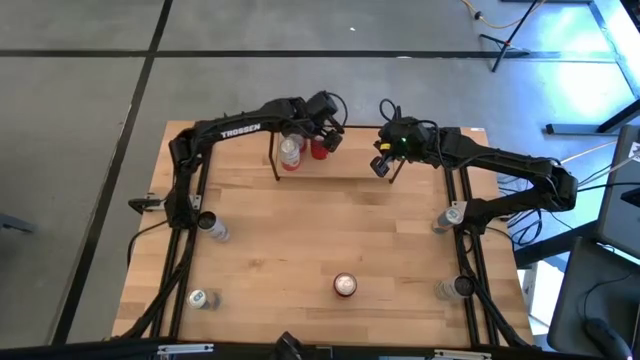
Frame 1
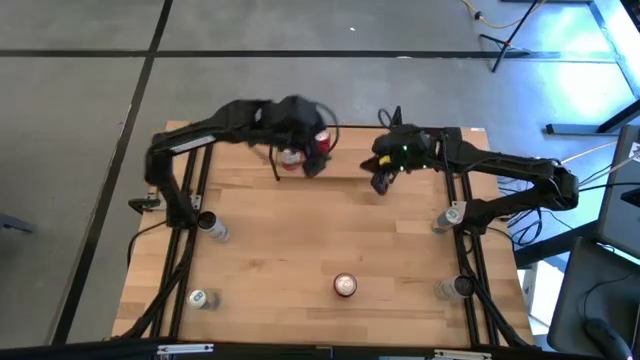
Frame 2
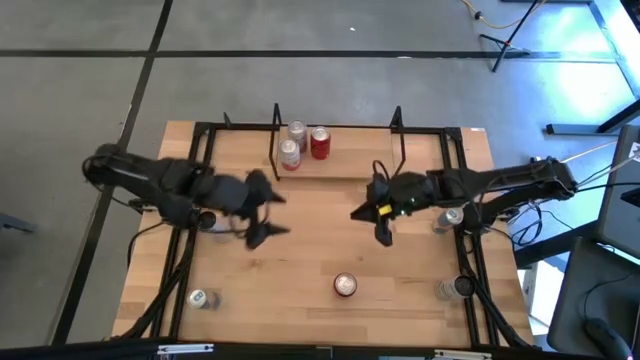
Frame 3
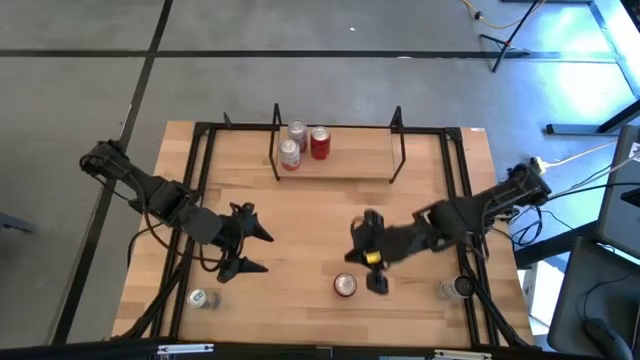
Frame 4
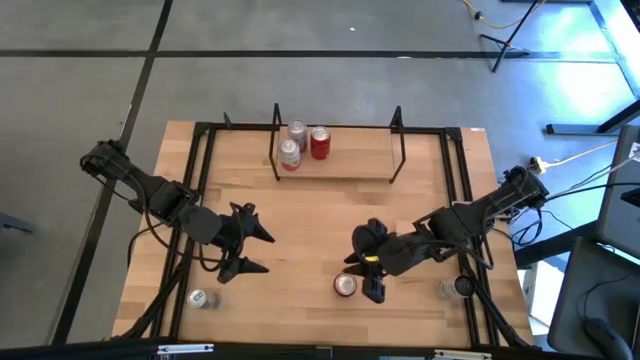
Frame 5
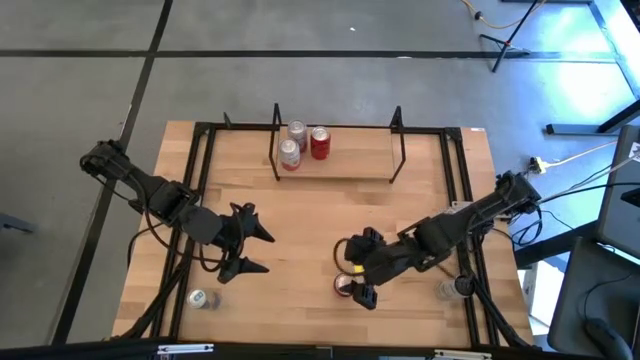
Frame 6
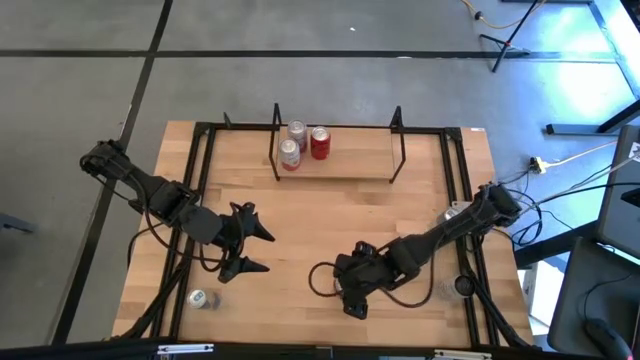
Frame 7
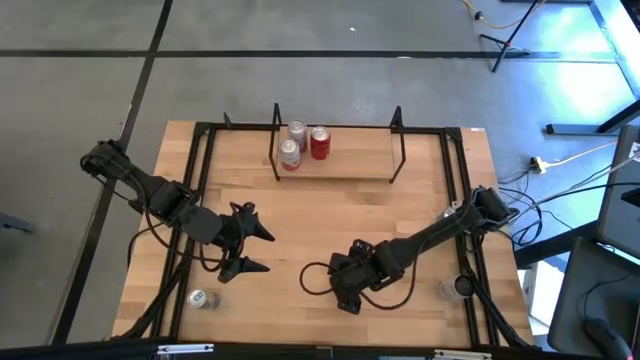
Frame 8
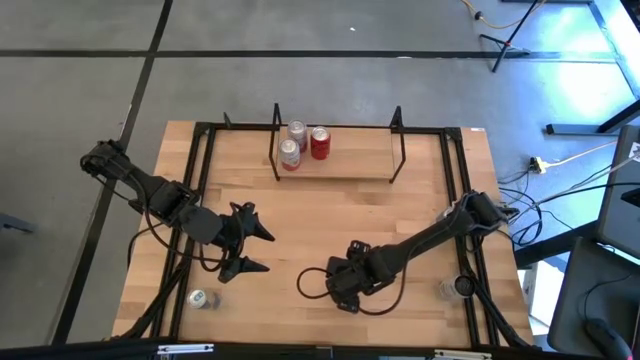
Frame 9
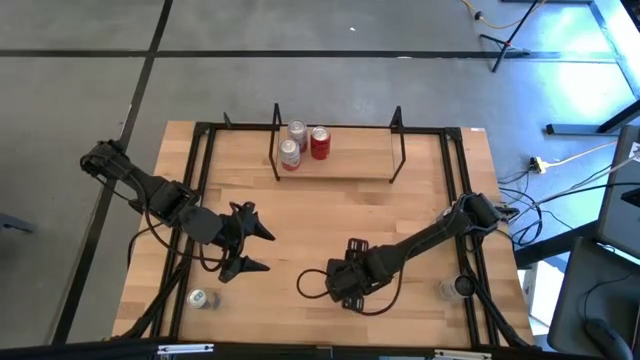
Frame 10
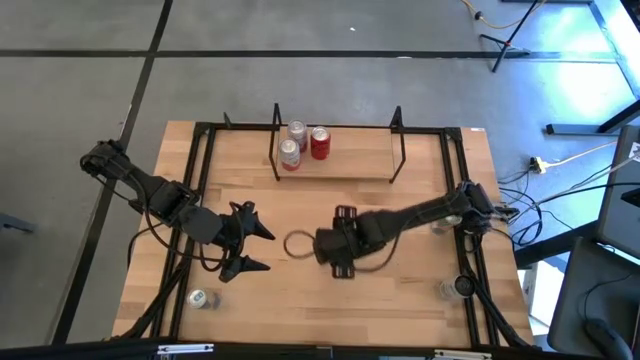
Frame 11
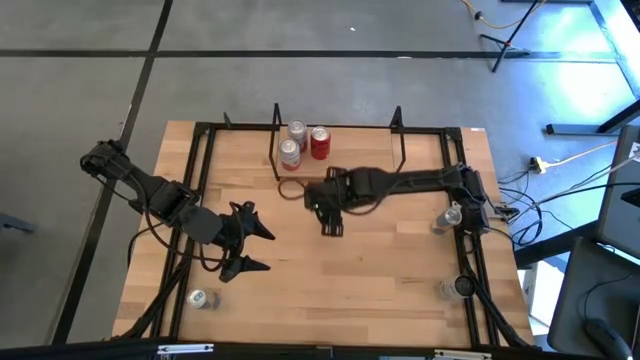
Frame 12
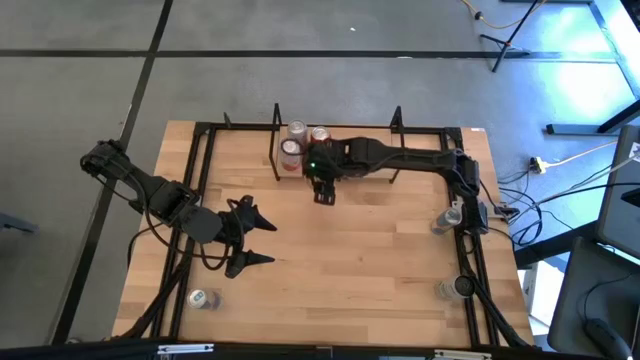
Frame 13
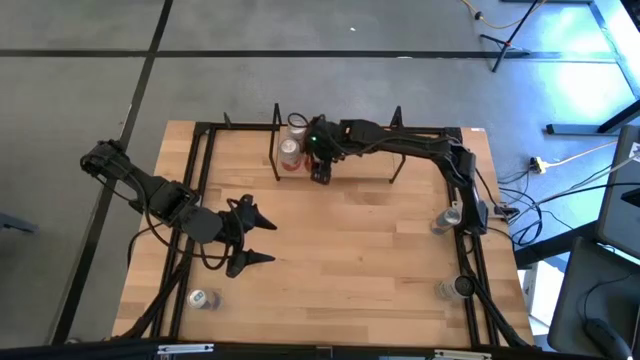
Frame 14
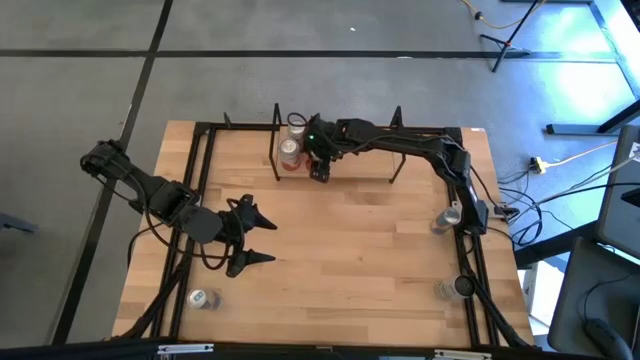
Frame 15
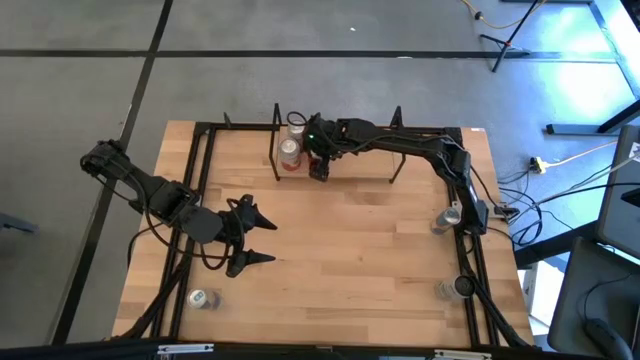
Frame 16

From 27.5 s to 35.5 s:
Task: Place canned beverage on shelf
Put the red soda can on the shelf aligned with the other red soda can

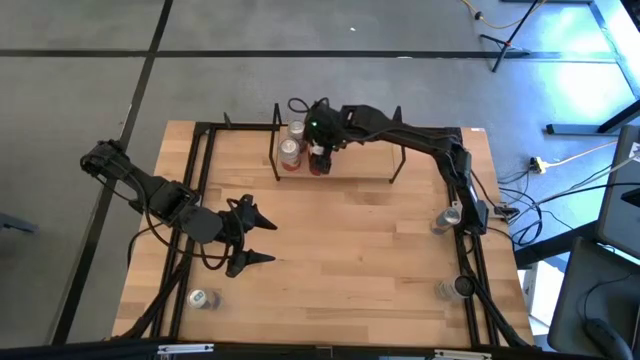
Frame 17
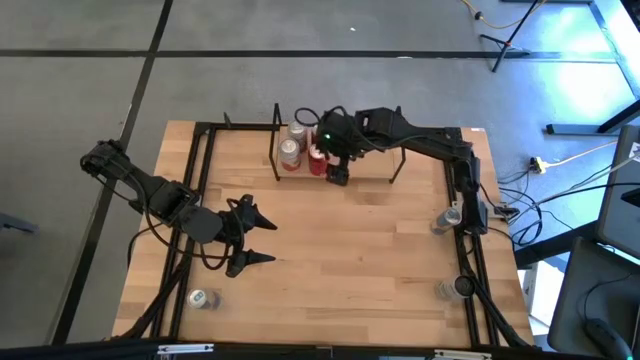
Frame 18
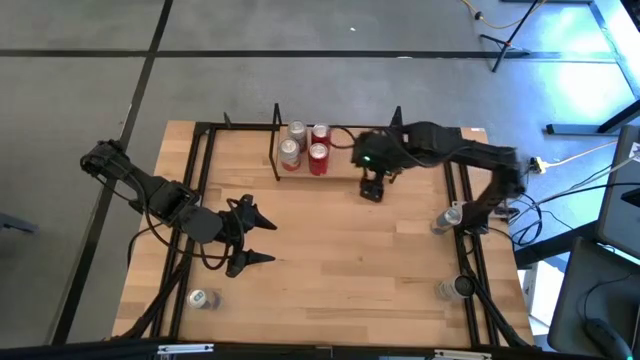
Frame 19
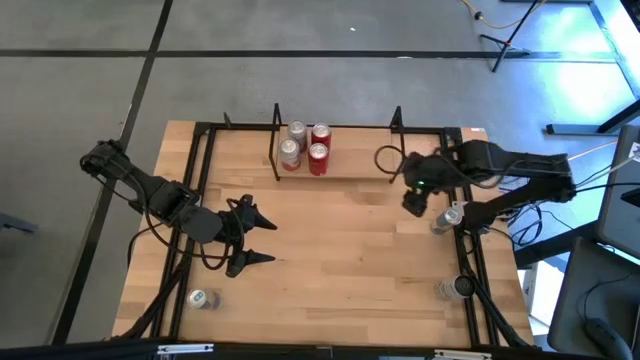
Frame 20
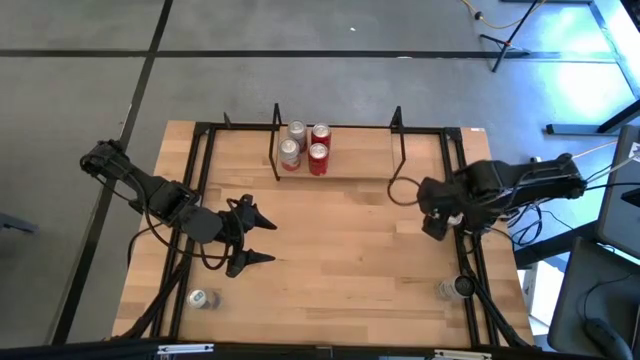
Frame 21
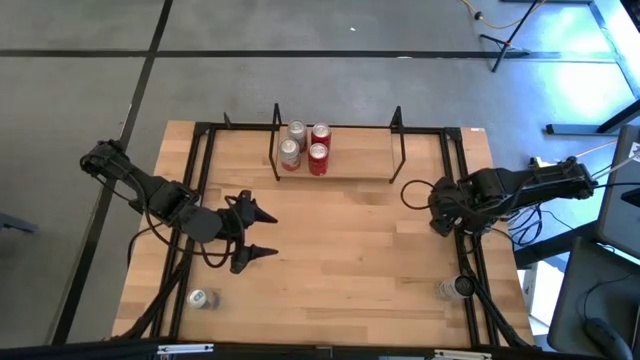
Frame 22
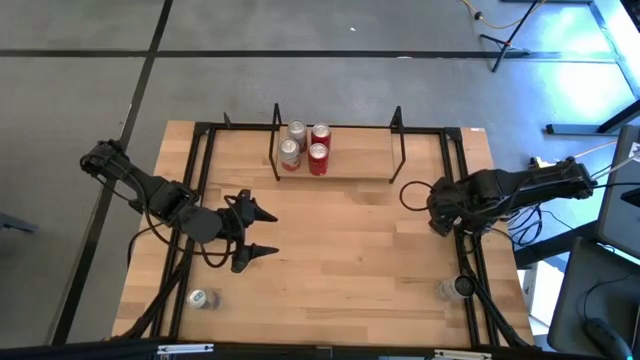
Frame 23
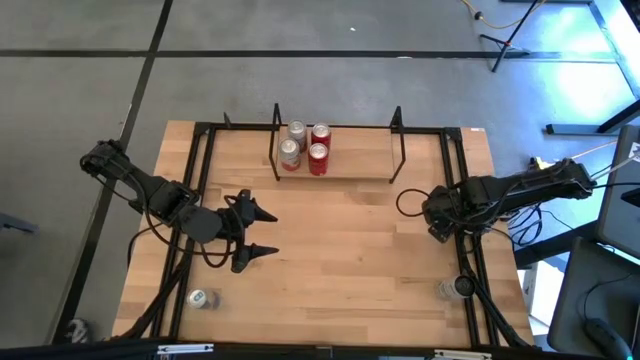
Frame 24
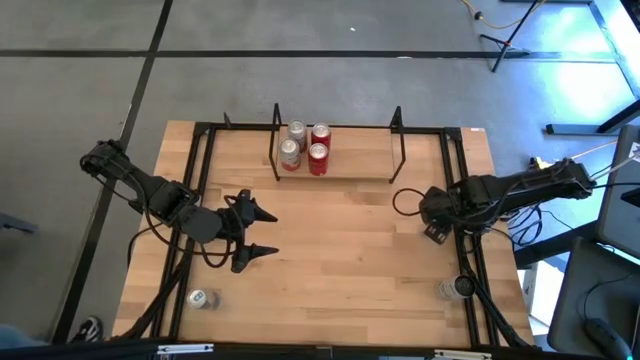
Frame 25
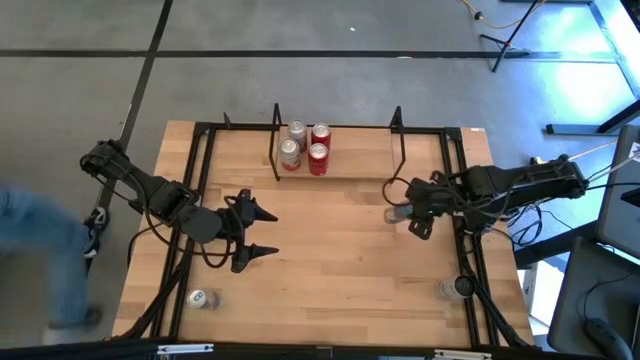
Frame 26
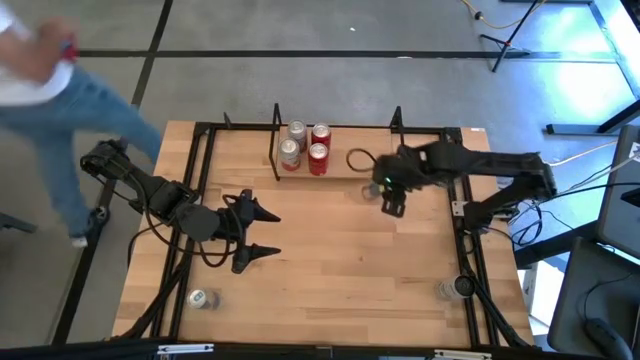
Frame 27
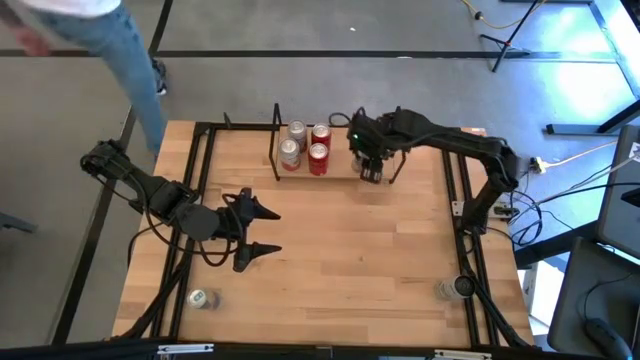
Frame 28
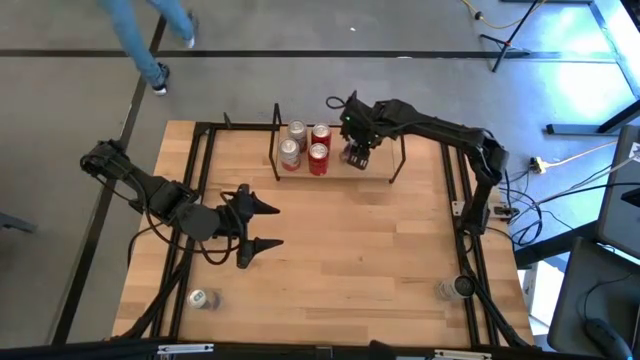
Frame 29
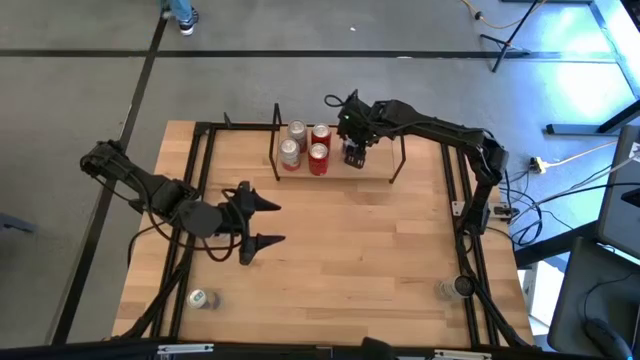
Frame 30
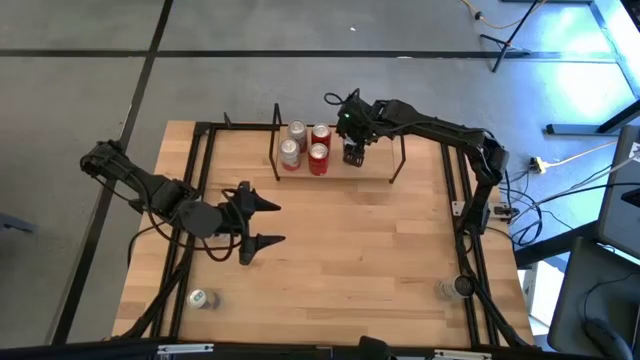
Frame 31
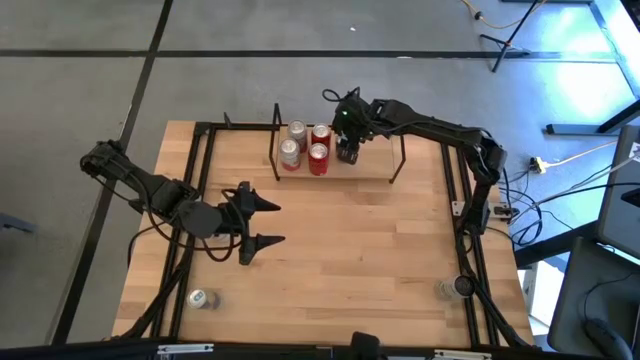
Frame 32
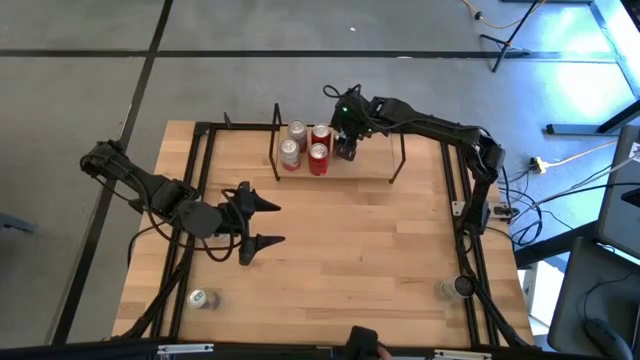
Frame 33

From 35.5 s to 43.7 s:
Put the top blue soda can on the shelf

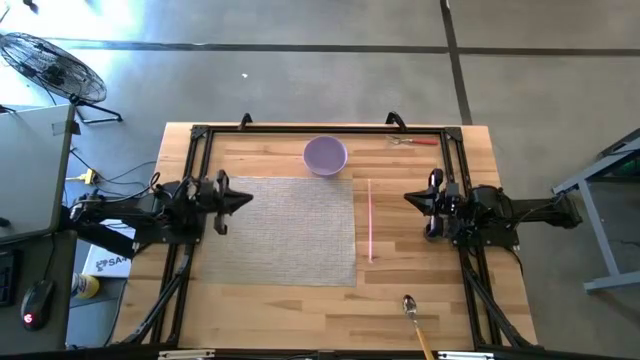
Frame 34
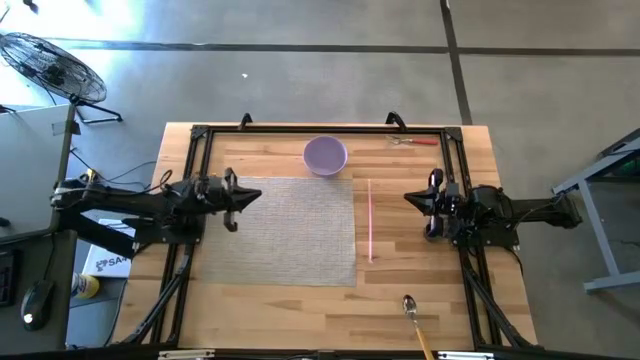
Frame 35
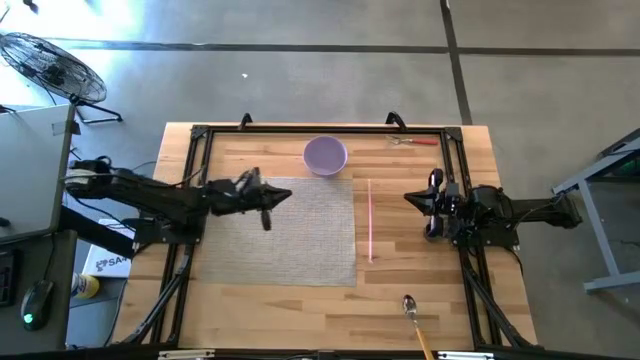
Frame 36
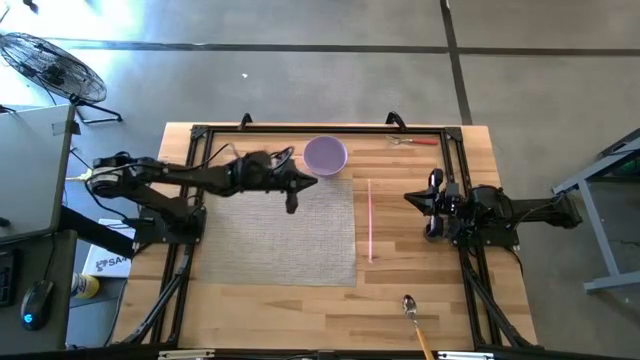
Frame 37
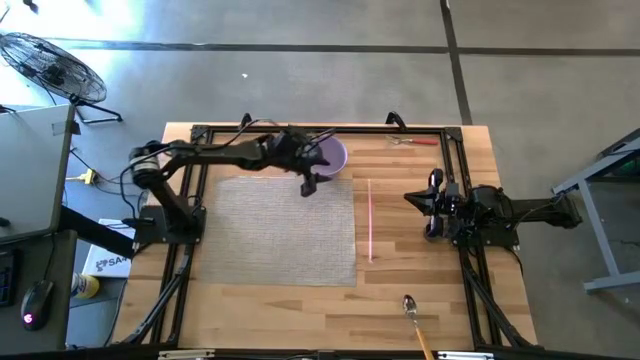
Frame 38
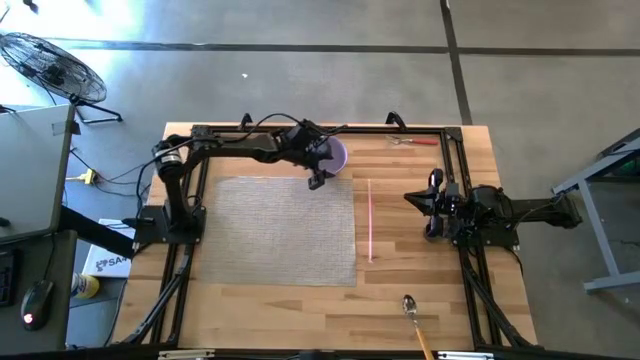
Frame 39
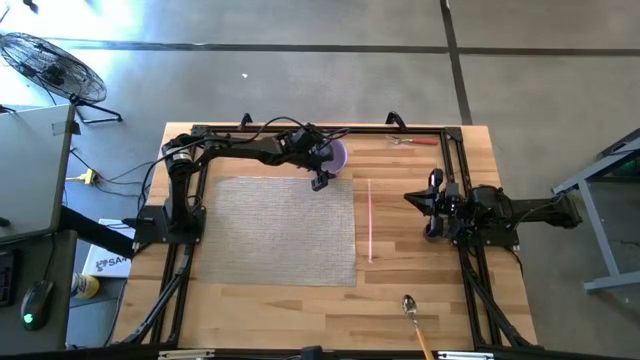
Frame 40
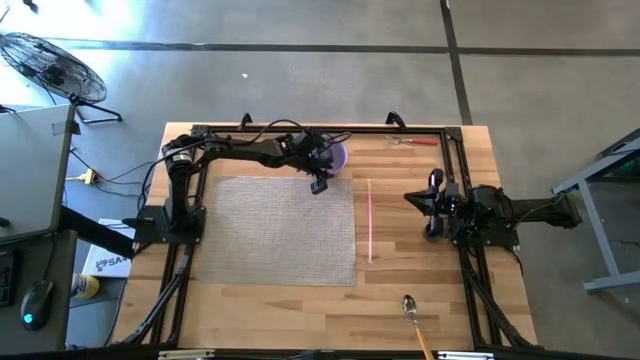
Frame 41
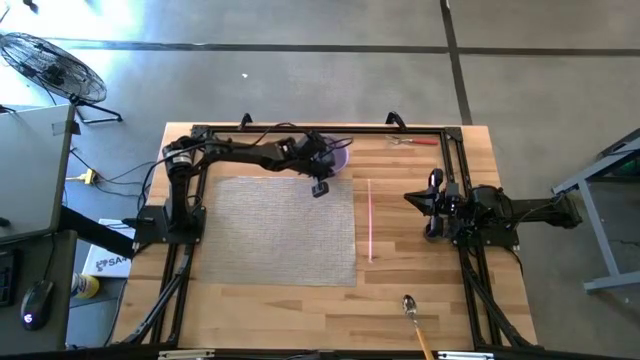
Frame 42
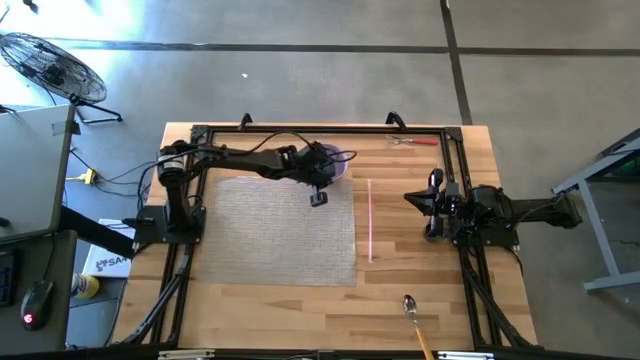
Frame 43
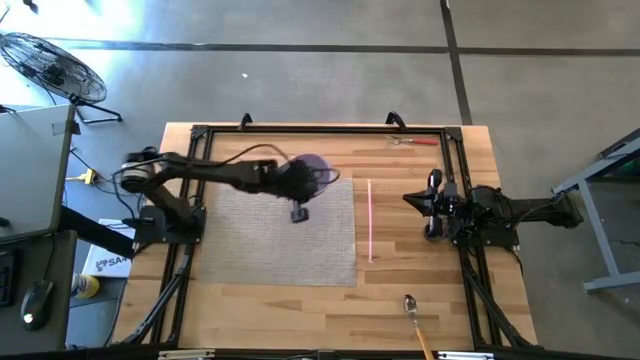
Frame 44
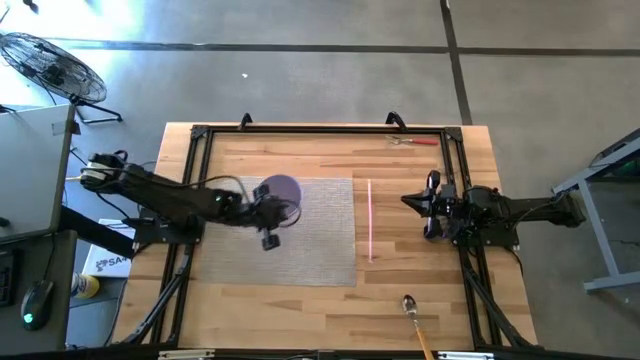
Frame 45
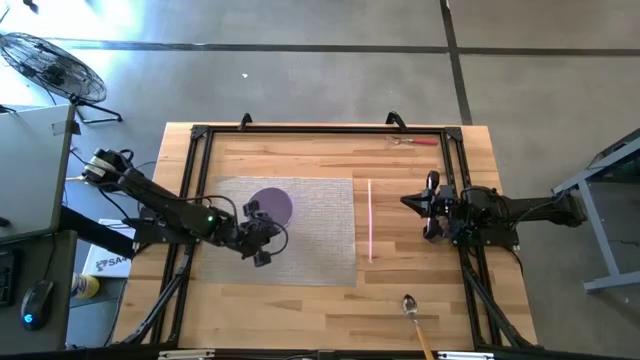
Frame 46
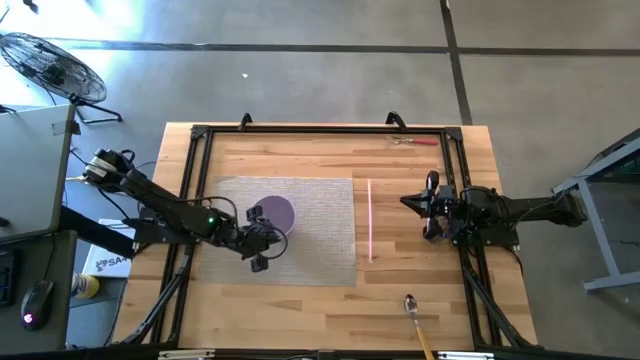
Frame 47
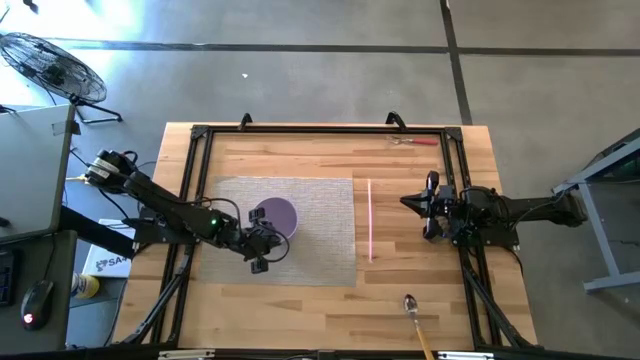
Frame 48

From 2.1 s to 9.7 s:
Task: Pick & Place Utensil
Put the purple bowl in the center of the gray mat
